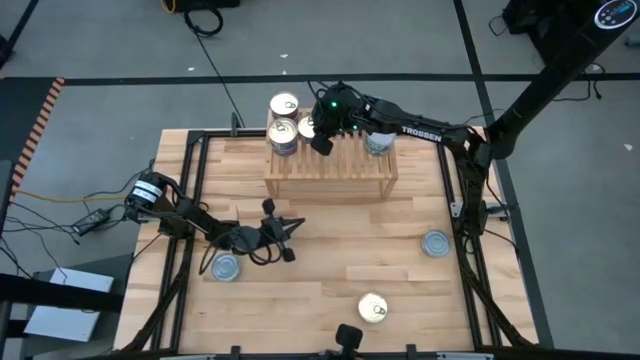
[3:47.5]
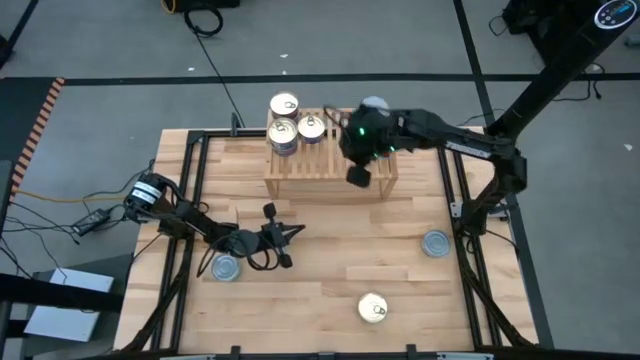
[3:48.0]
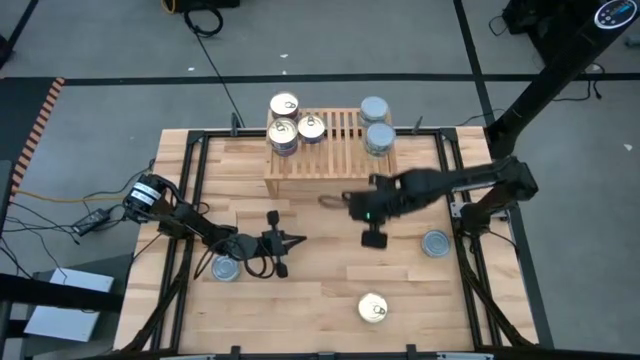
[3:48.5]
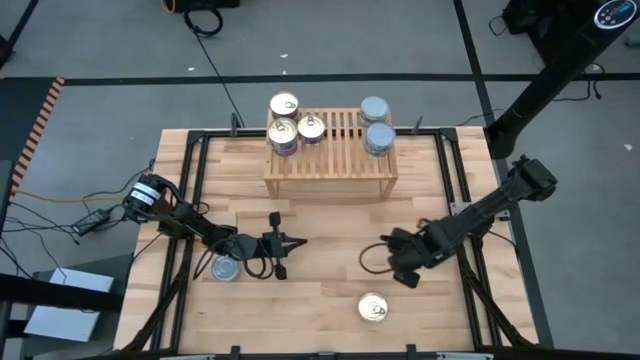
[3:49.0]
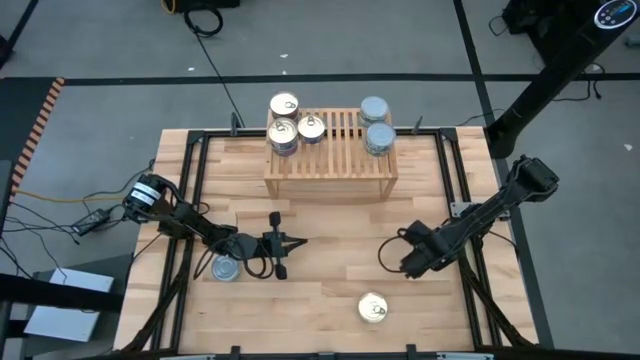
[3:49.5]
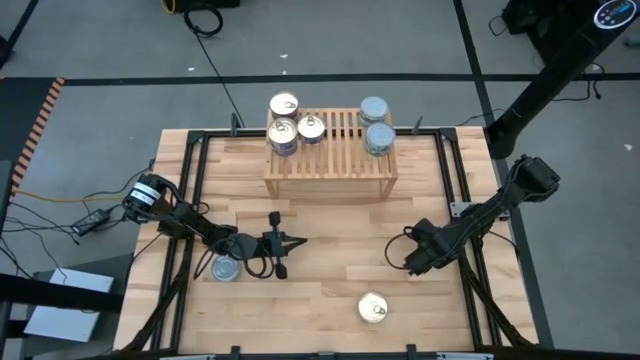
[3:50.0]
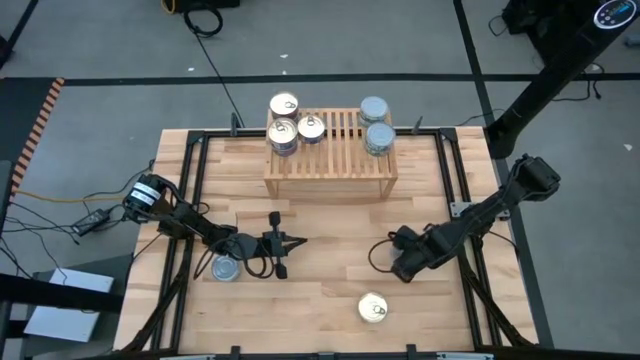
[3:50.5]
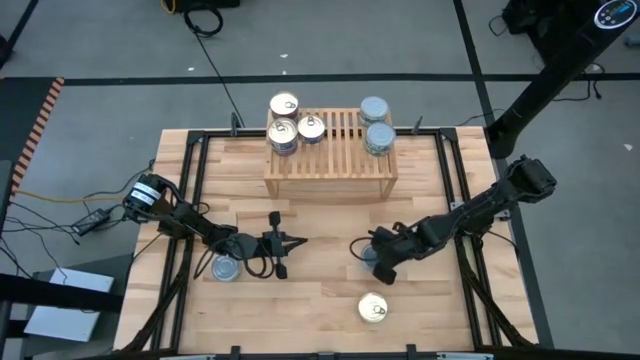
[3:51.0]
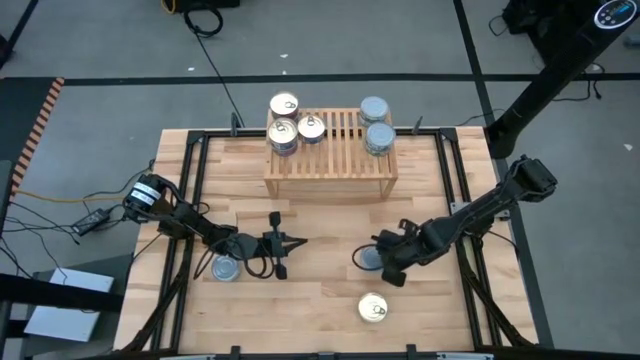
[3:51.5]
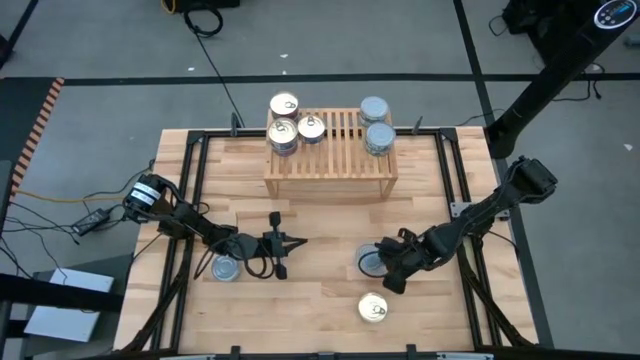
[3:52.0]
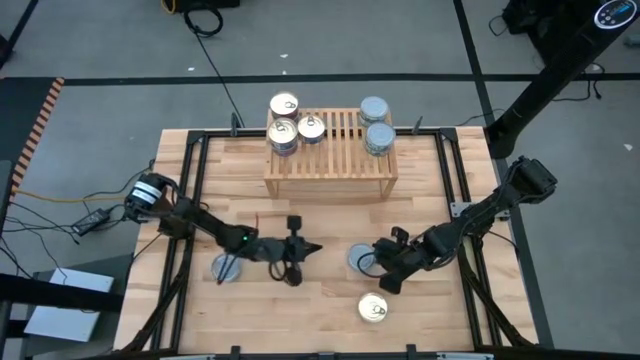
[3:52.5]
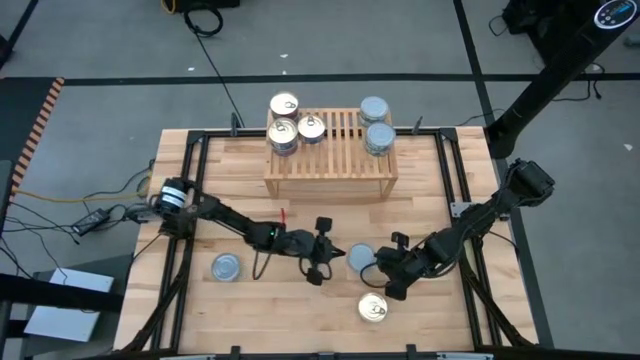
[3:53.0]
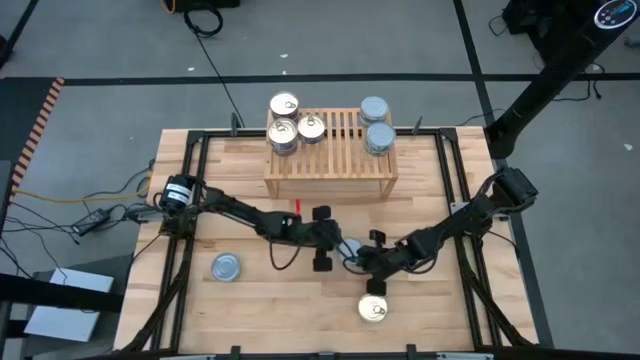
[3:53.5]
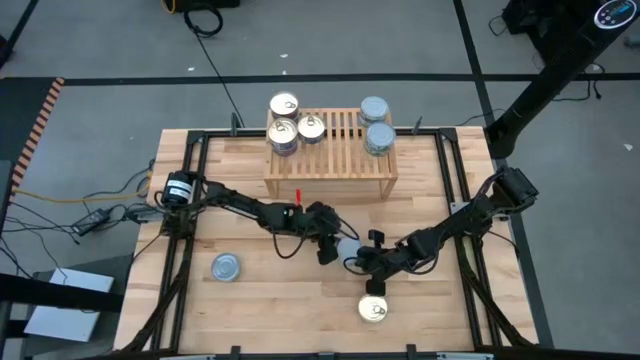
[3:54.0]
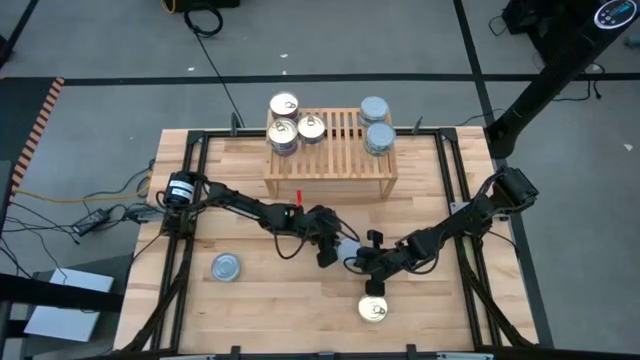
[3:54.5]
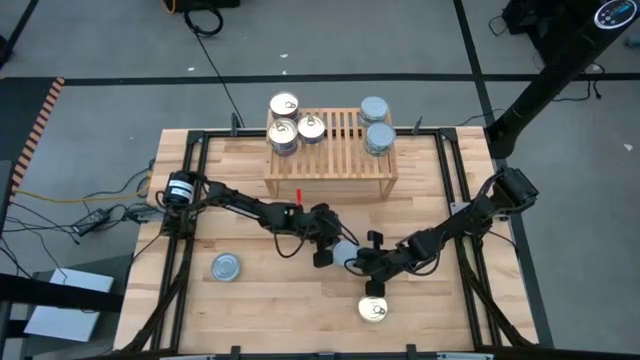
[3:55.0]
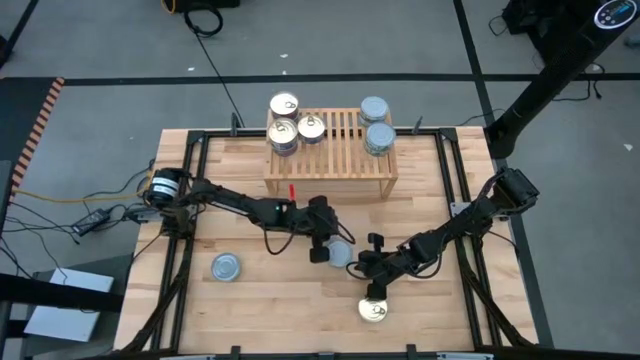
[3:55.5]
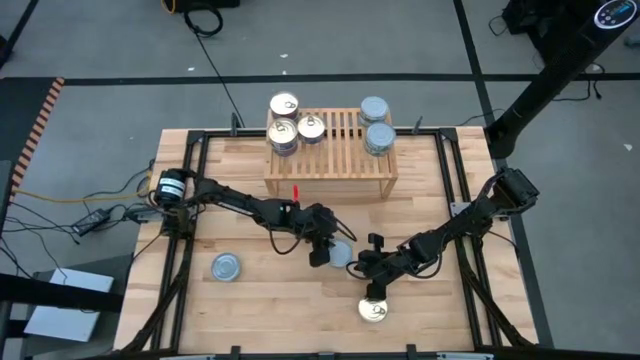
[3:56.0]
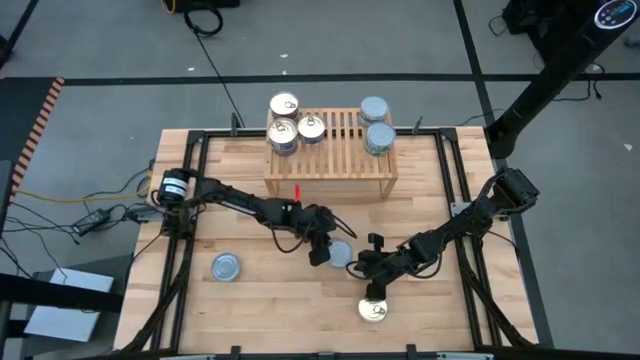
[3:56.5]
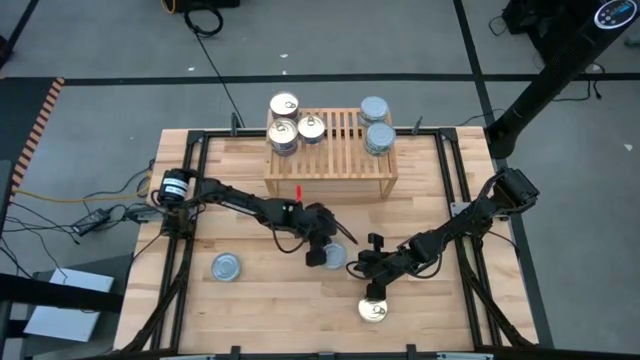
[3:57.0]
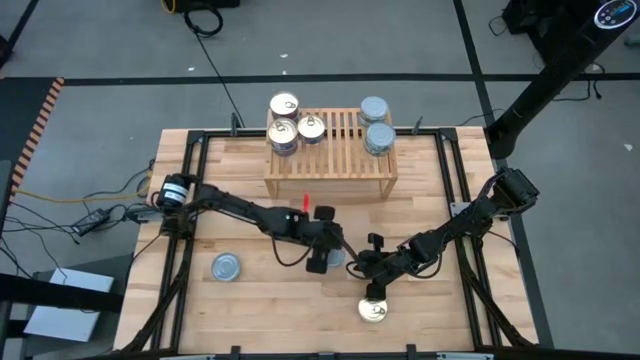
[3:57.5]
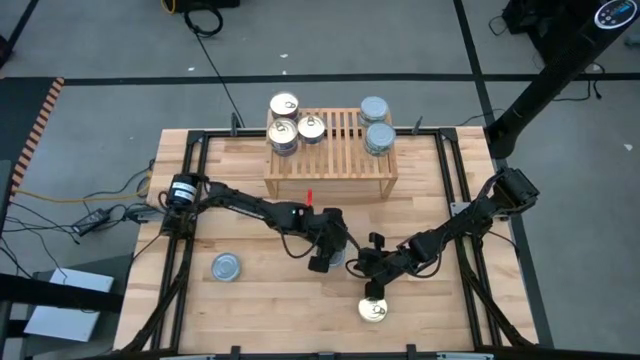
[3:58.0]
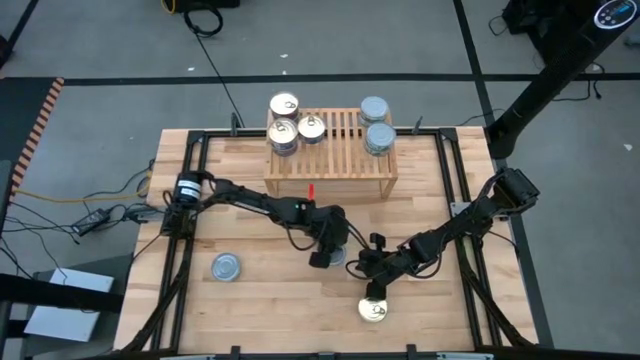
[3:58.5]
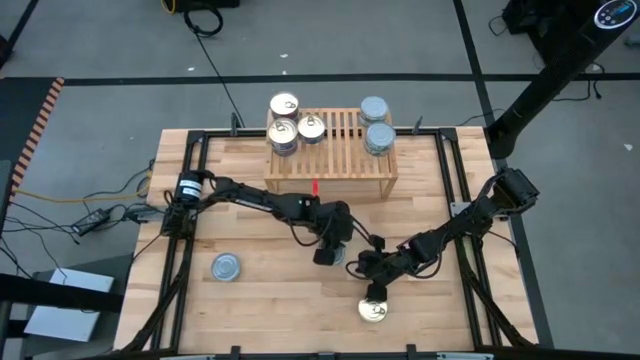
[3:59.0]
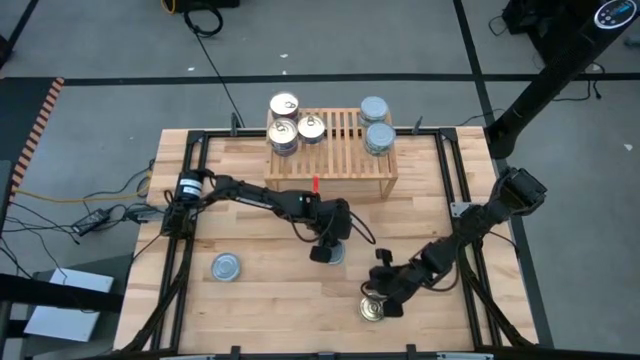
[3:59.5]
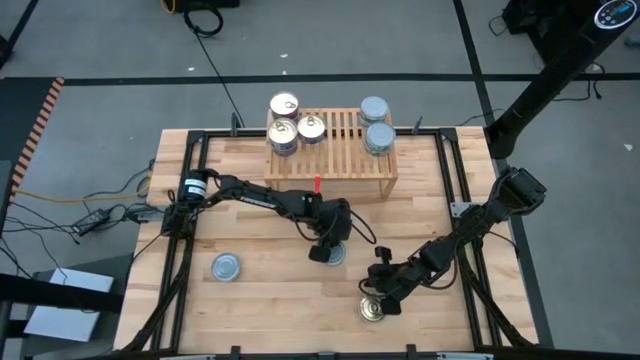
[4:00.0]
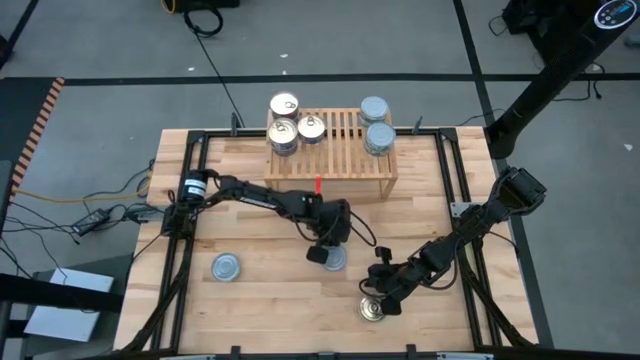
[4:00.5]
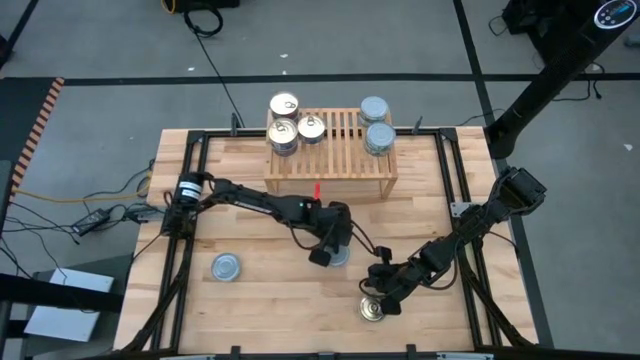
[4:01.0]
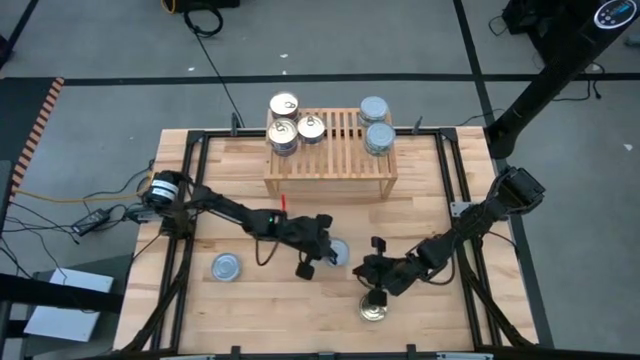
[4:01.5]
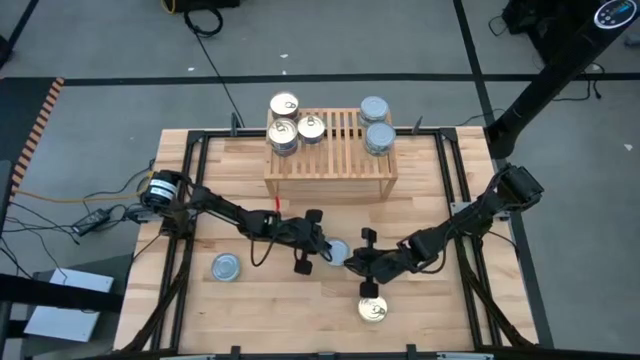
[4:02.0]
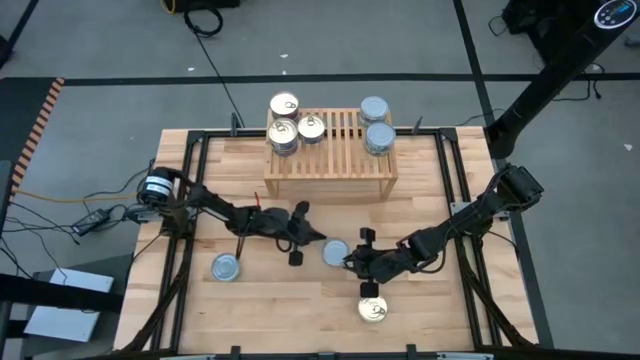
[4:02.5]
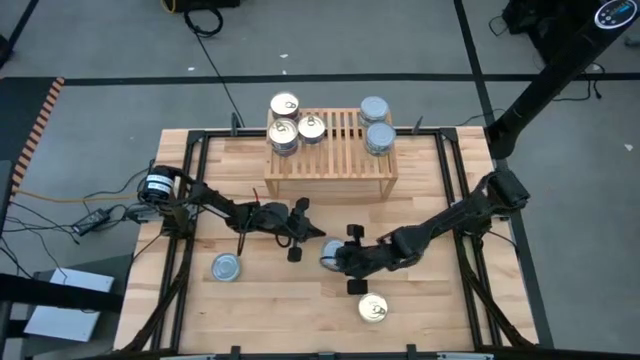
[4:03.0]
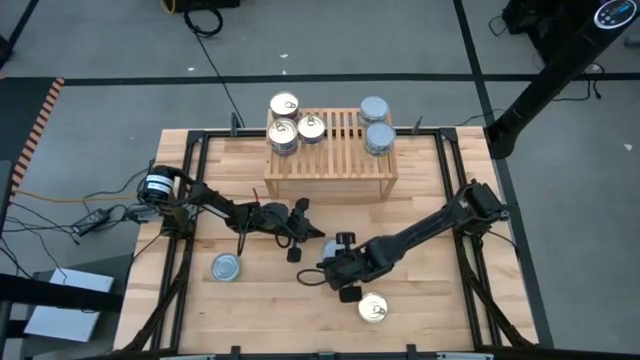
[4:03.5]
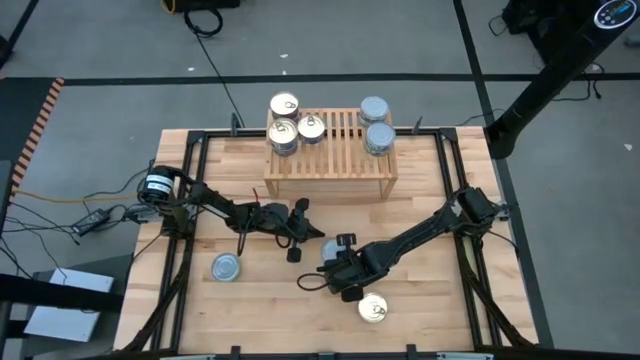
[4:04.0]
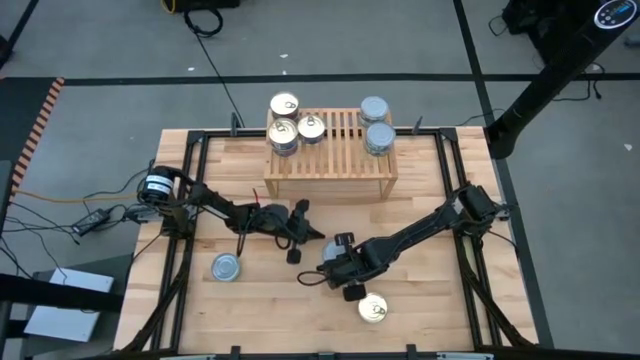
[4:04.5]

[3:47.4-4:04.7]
Task: Stack canned seafood by type on shelf
Put the green tuna can on the shelf
